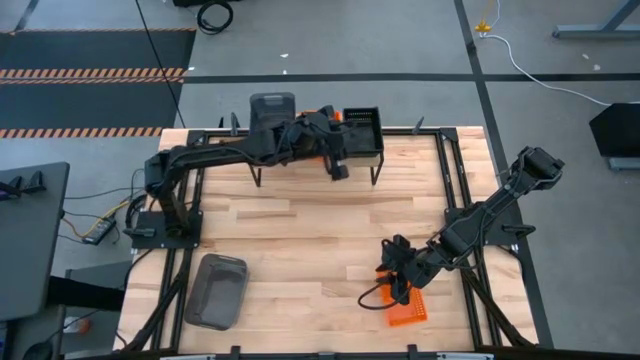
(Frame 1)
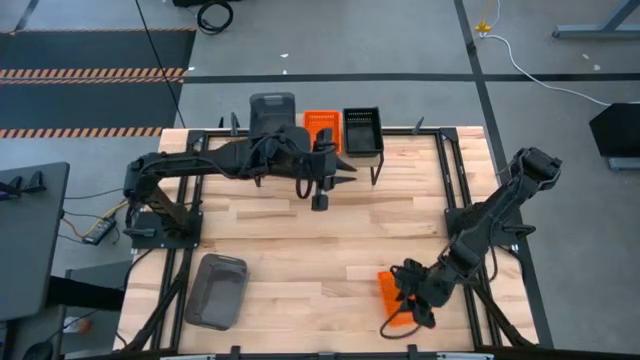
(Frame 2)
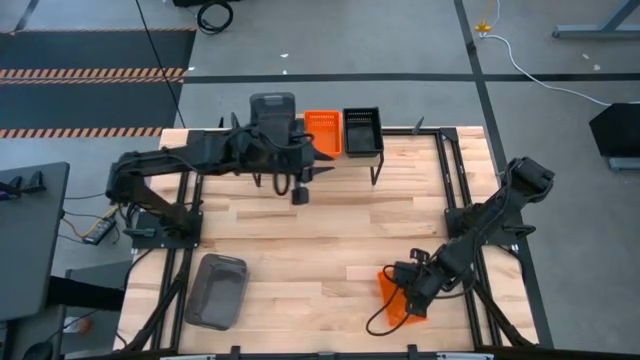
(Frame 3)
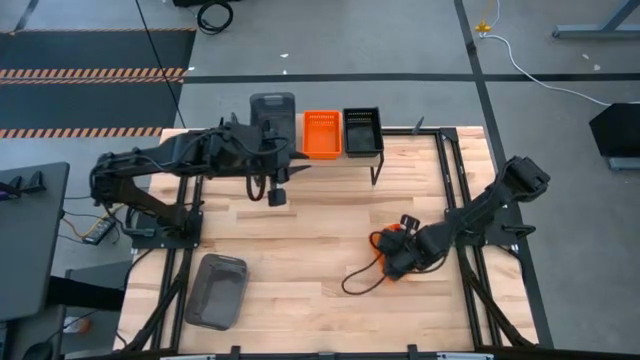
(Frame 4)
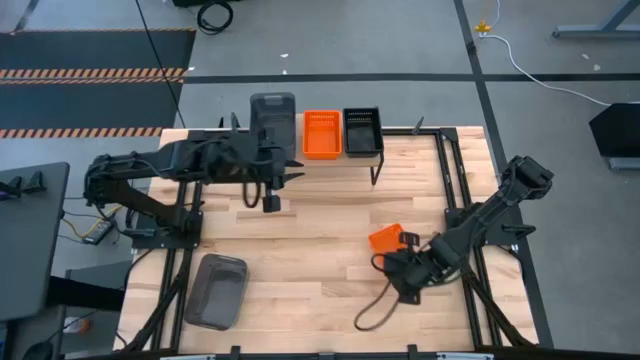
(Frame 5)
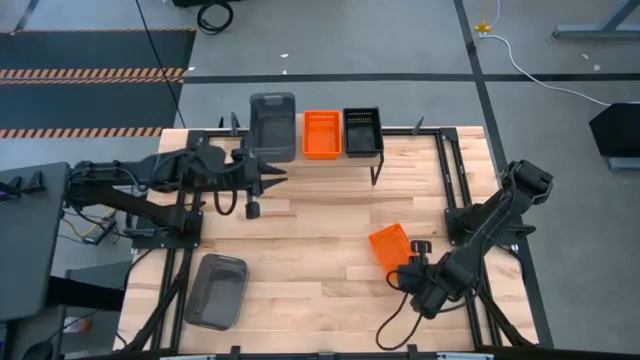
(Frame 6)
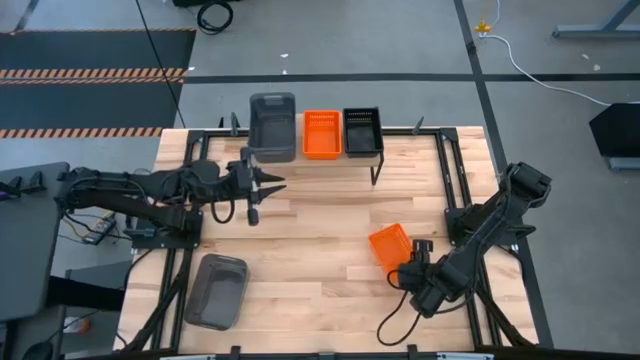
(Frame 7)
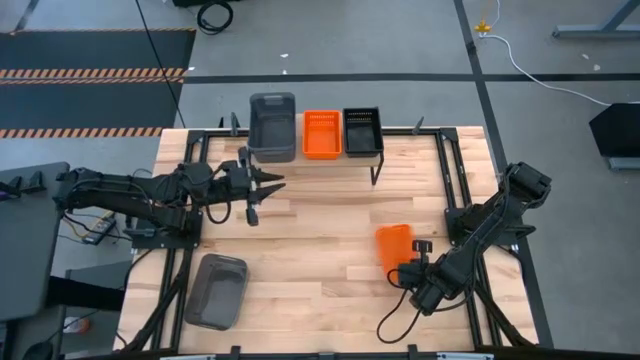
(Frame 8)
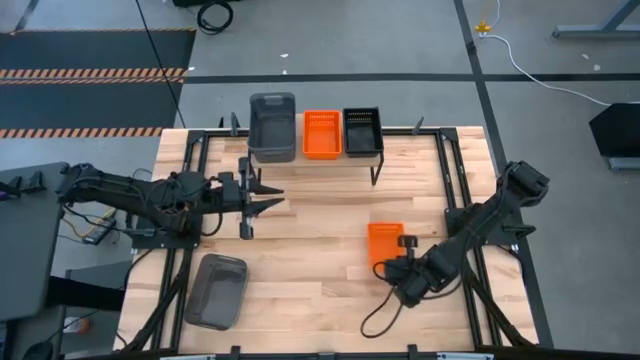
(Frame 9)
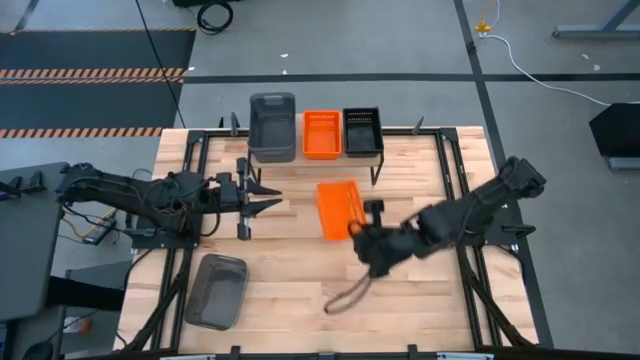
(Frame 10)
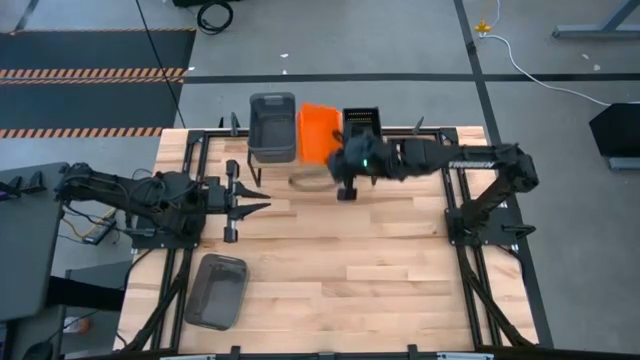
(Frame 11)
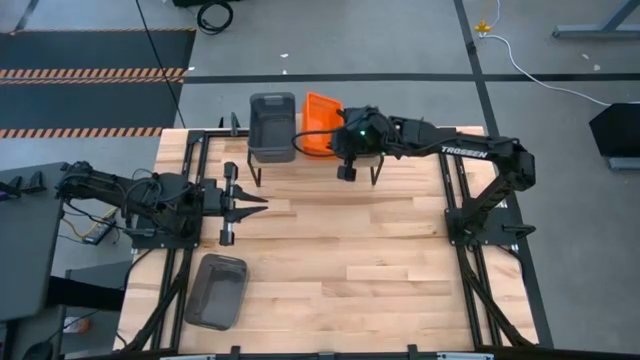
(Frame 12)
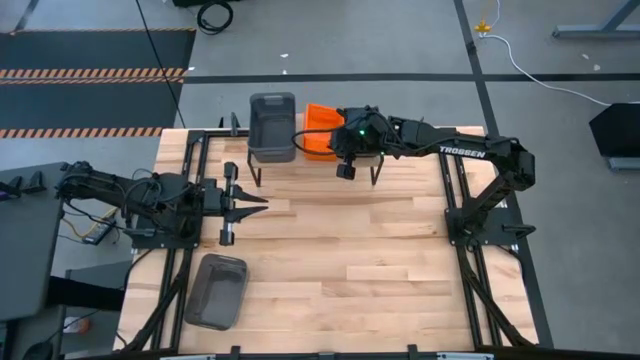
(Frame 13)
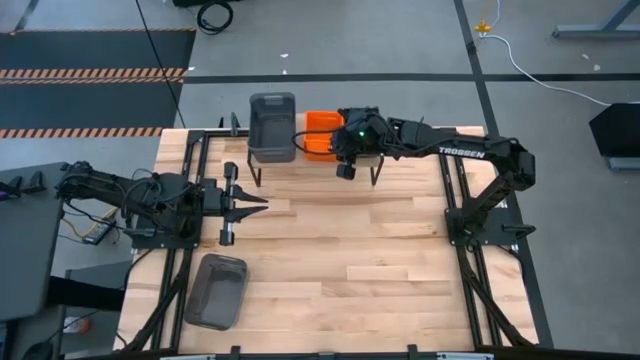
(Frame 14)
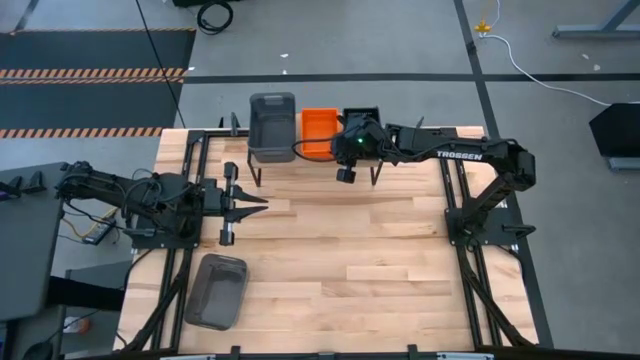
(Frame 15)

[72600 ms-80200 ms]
Task: Stack baskets on shelf by color
Stack the orange basket on top of the orange basket on the shelf

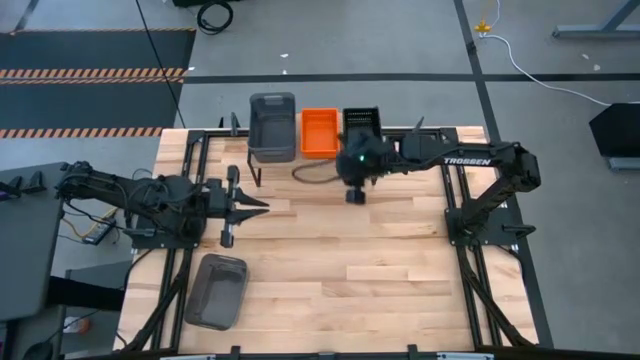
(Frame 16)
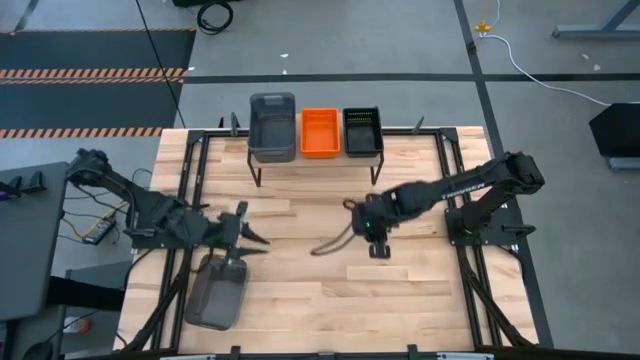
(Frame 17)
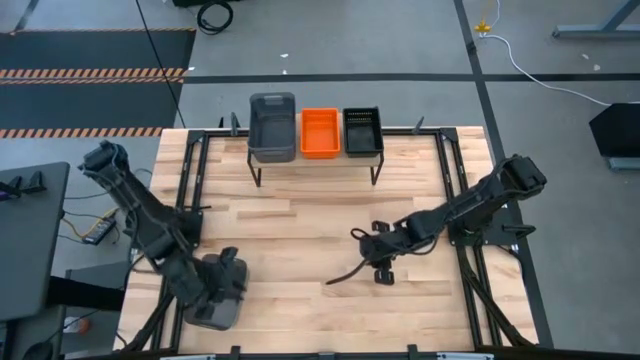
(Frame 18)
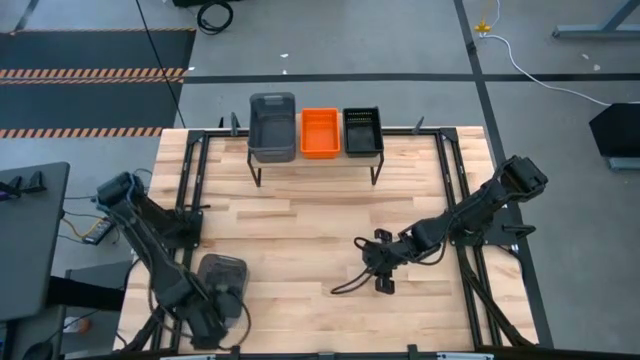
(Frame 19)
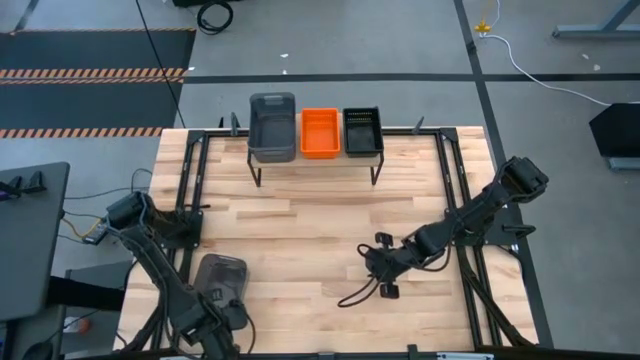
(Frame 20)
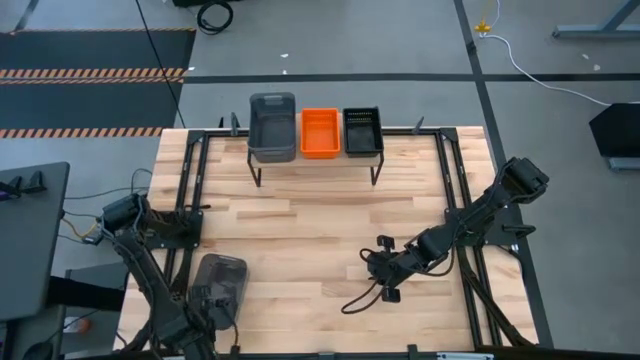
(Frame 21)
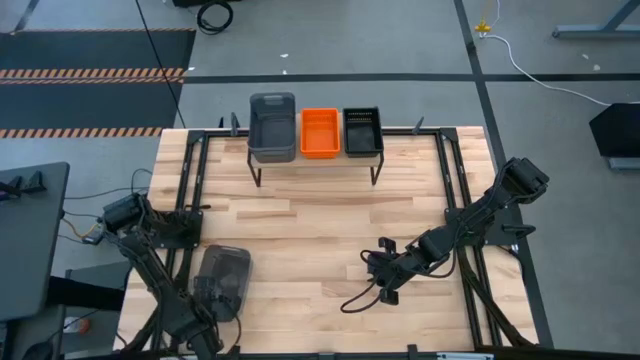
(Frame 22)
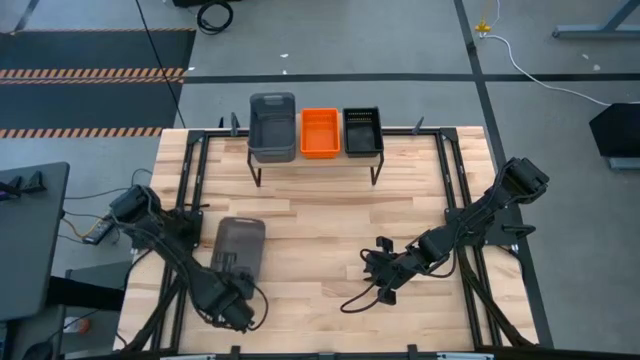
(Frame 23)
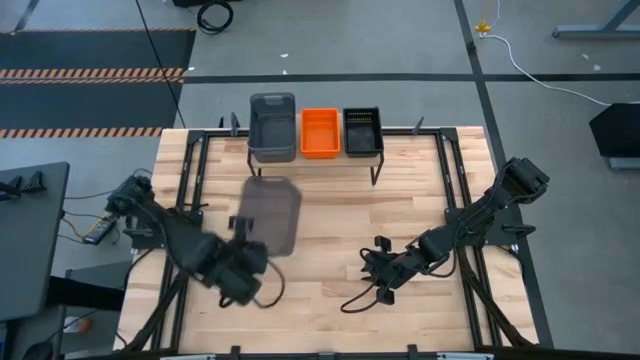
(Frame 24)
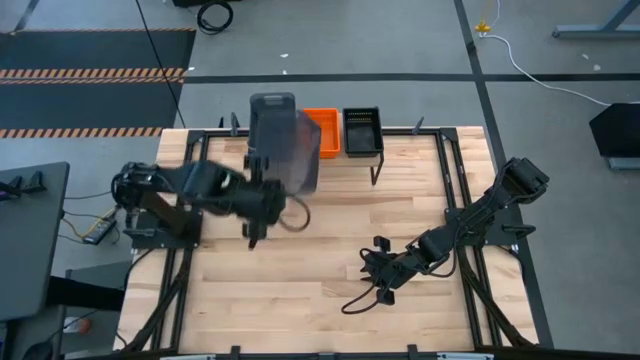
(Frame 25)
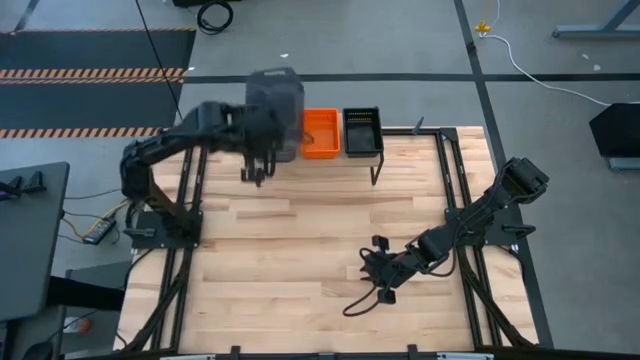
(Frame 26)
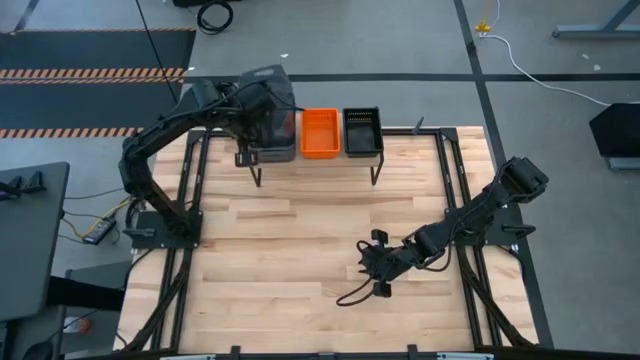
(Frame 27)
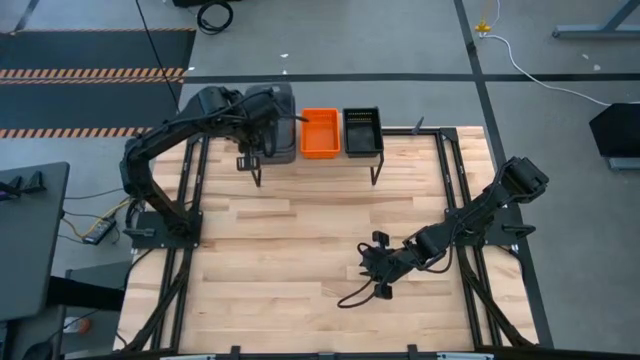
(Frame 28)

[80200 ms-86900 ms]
Stack the black bin on top of the black bin on the shelf

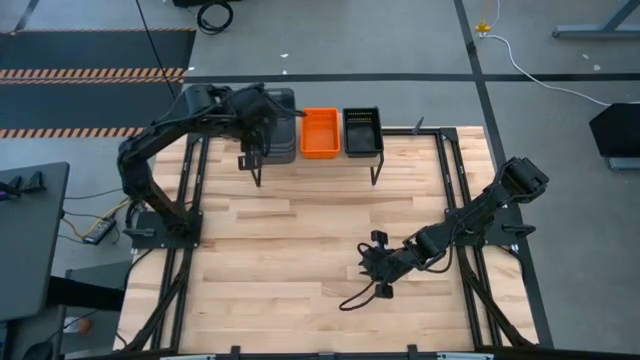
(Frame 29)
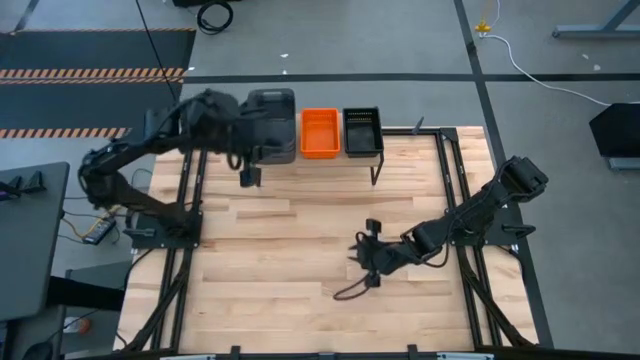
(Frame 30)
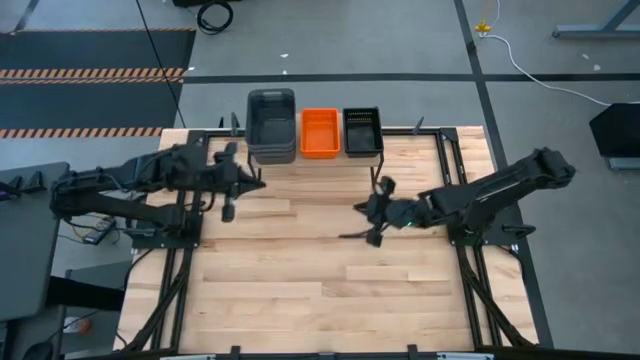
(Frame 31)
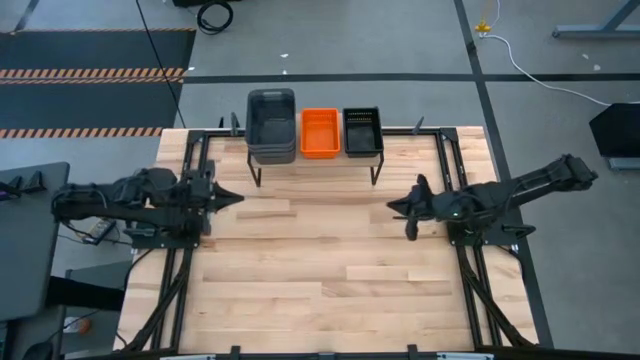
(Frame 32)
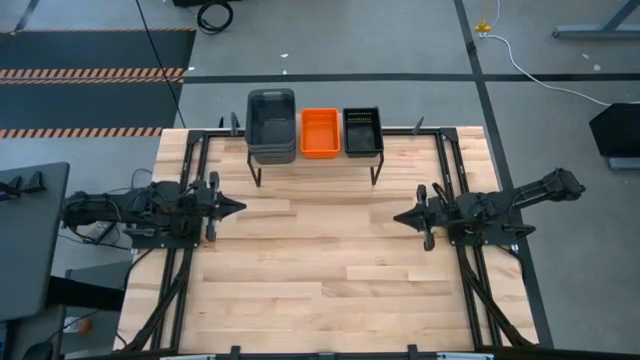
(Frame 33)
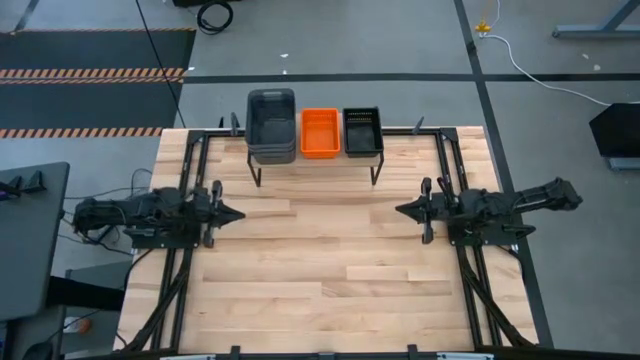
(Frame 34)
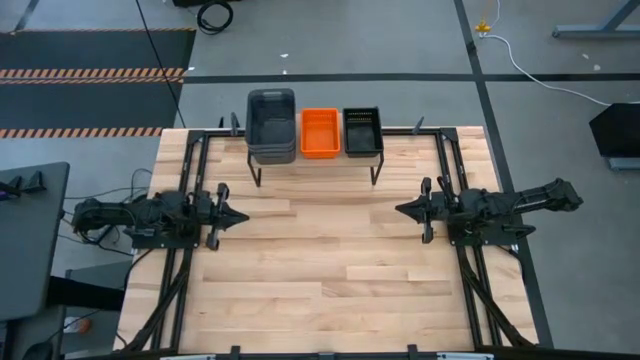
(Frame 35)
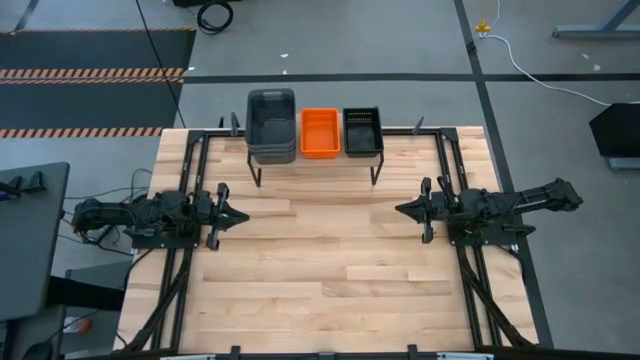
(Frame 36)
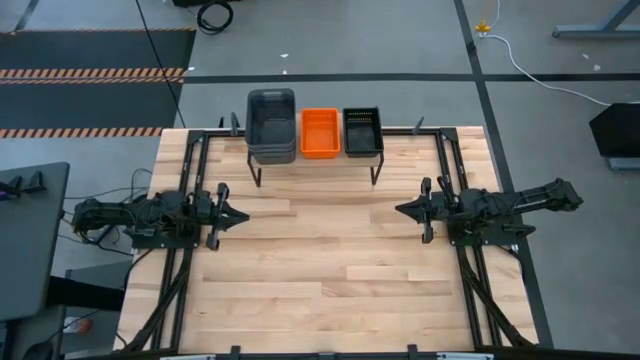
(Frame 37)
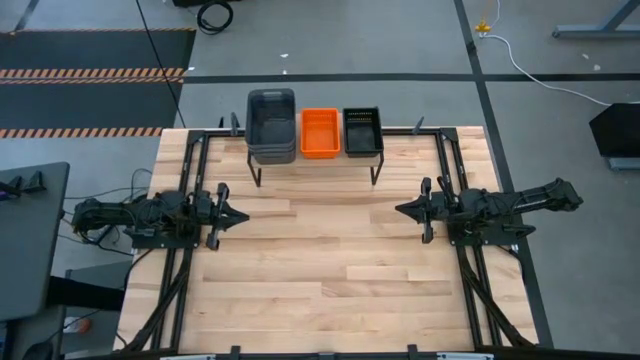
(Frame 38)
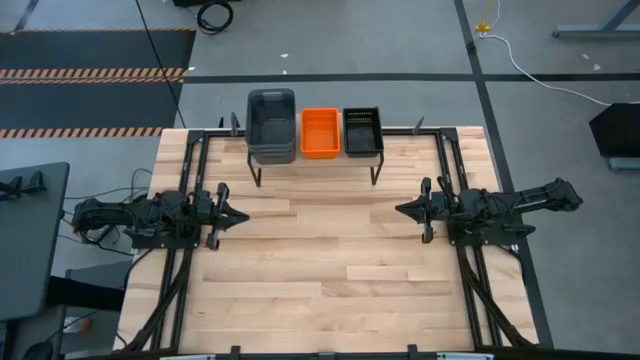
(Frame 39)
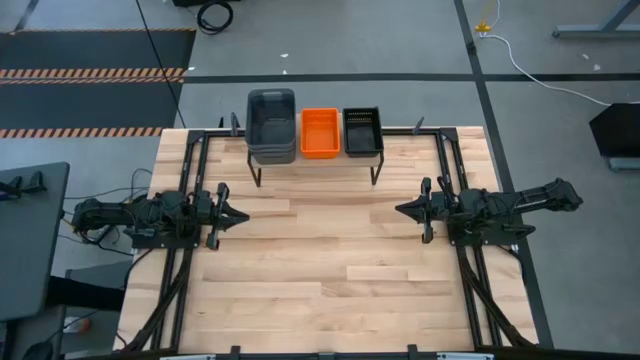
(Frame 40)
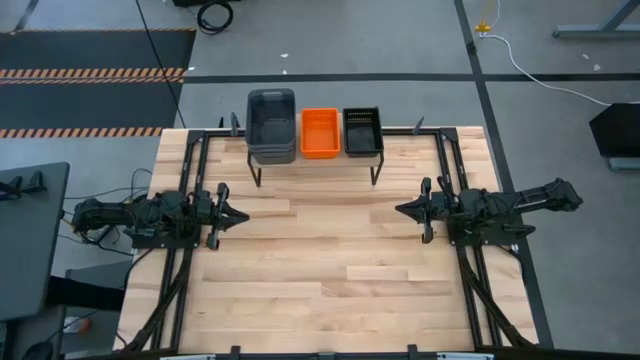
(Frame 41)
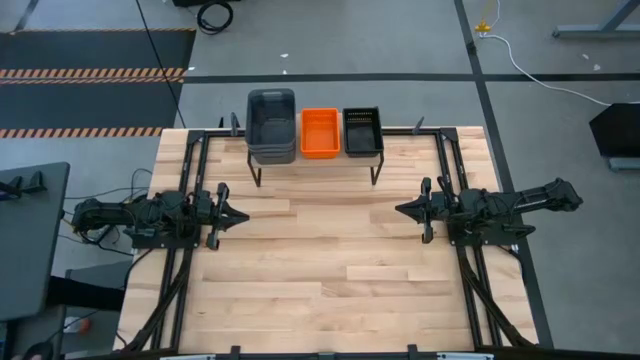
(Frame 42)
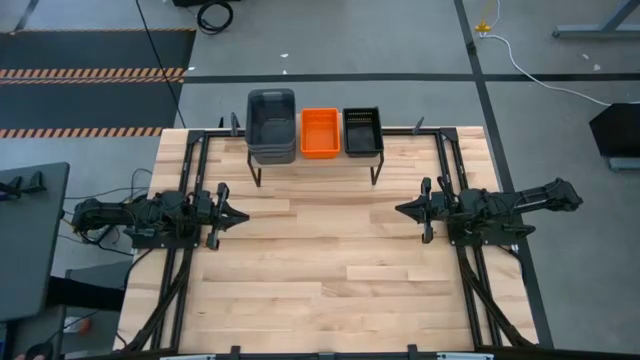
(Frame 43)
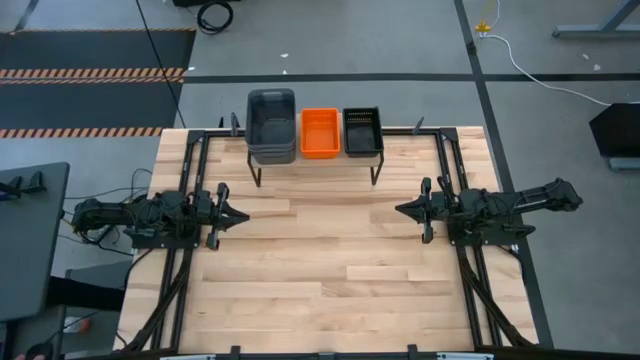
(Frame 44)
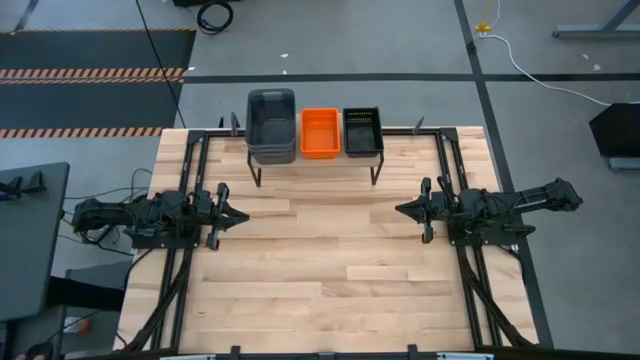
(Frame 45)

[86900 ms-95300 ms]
Return to Home Position
